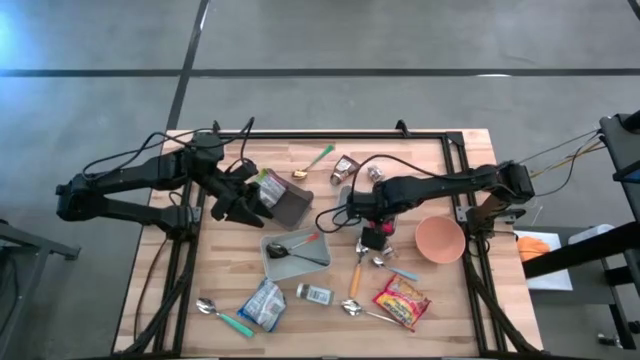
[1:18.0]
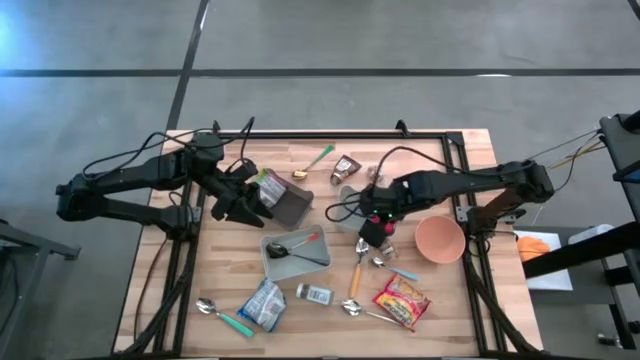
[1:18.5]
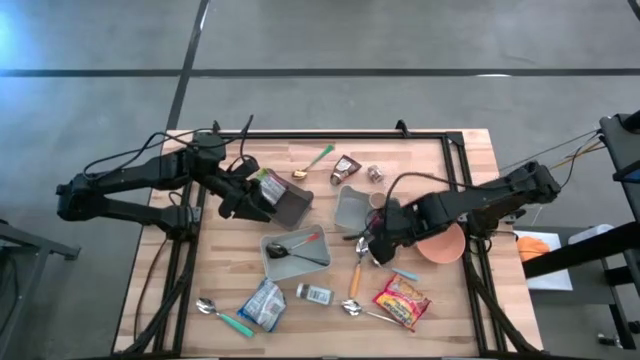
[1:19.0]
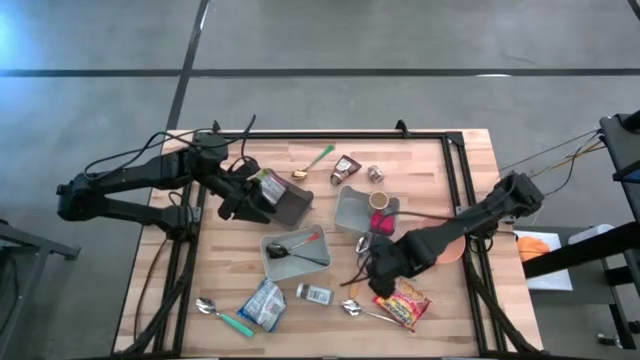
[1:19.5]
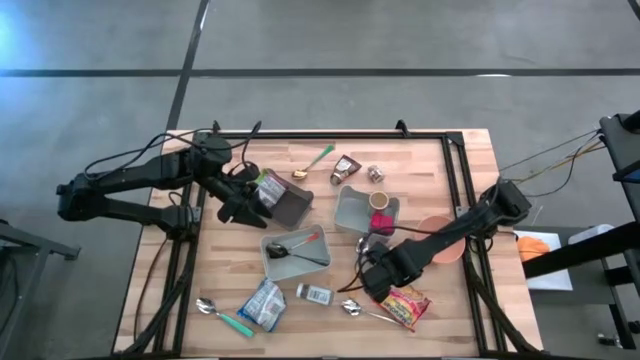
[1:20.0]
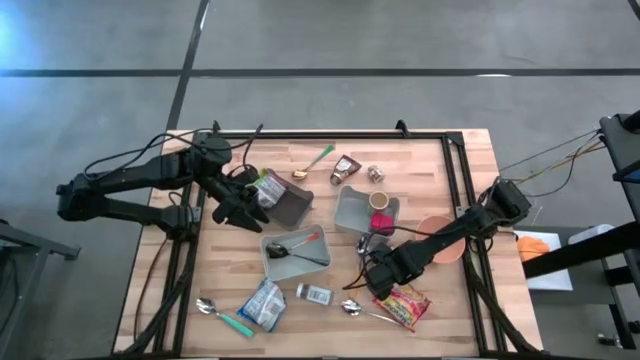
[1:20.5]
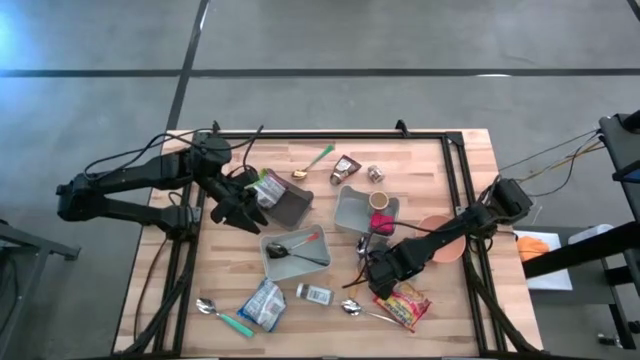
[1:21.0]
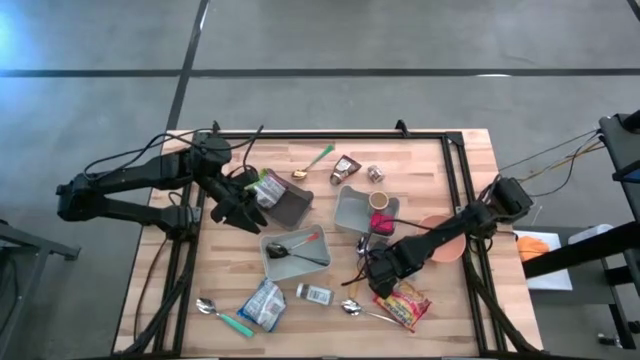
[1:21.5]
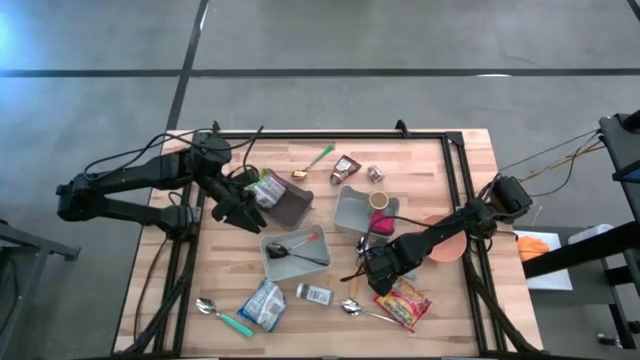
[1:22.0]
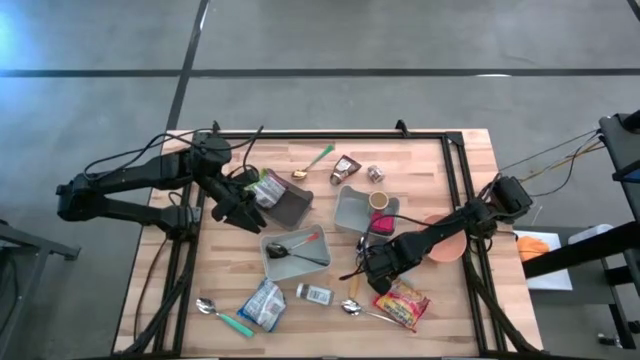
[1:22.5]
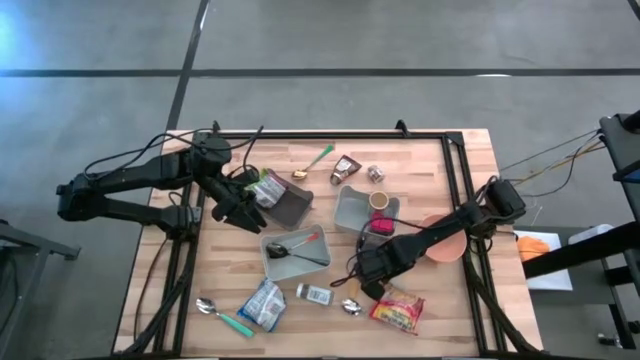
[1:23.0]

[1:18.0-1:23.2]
Put the blue spoon into the bottom gray bin

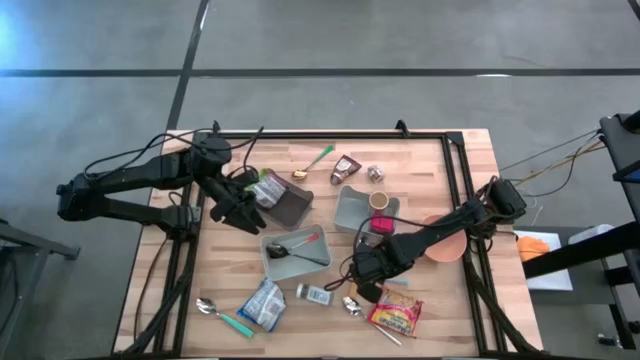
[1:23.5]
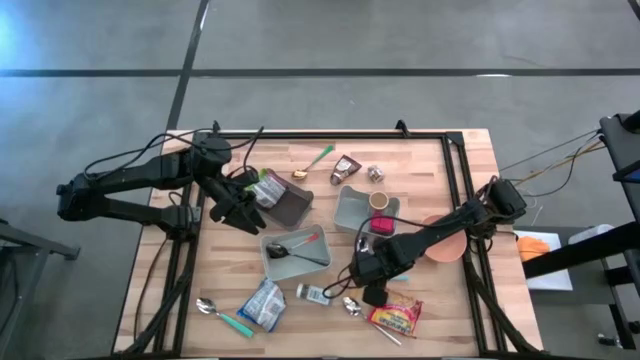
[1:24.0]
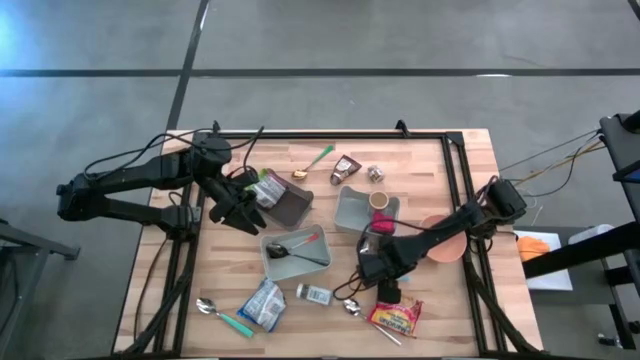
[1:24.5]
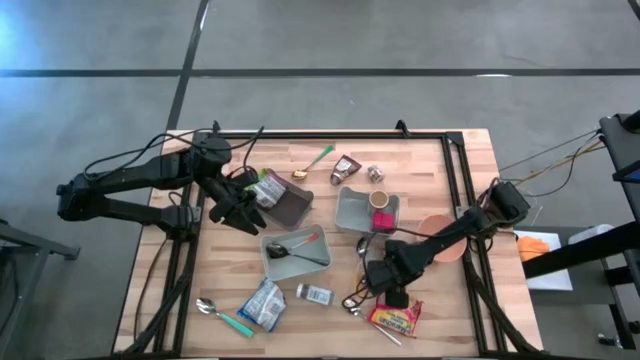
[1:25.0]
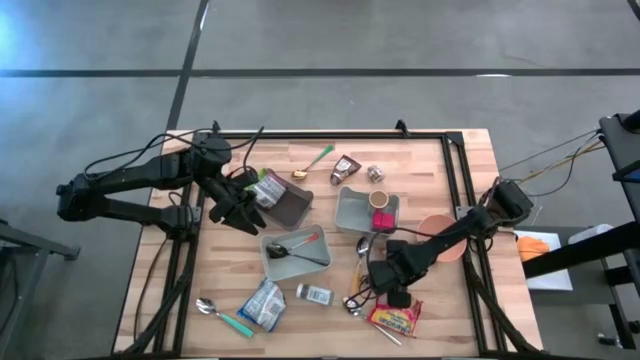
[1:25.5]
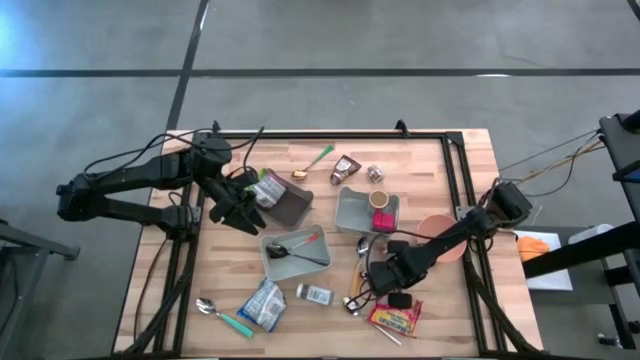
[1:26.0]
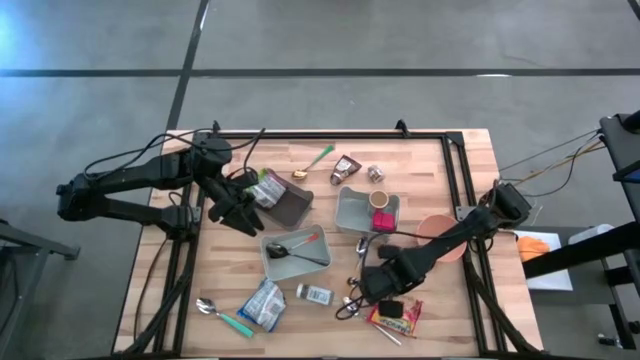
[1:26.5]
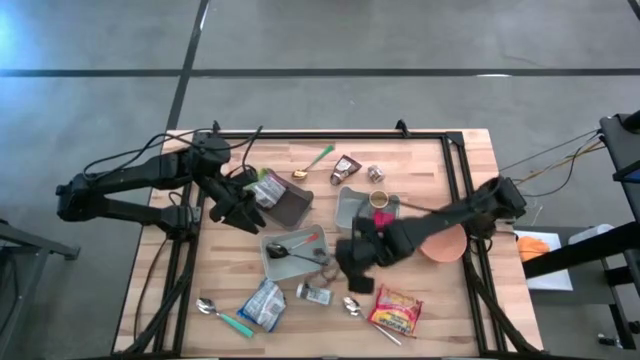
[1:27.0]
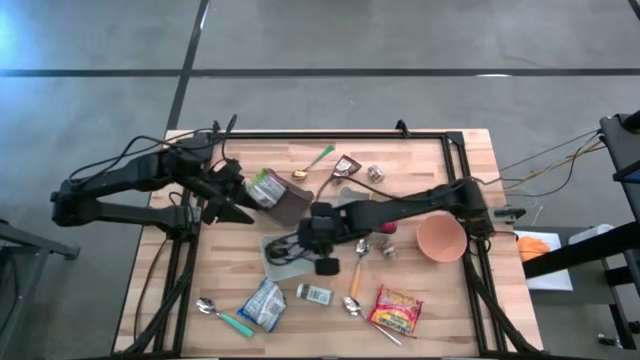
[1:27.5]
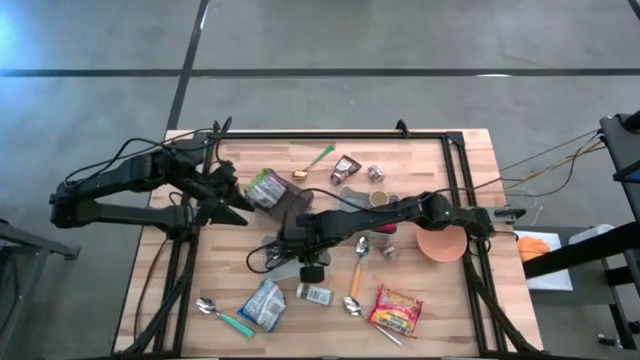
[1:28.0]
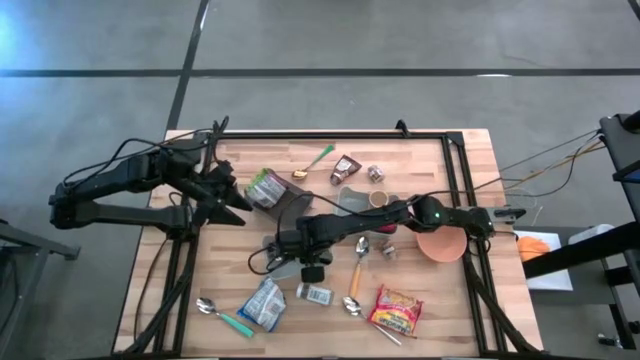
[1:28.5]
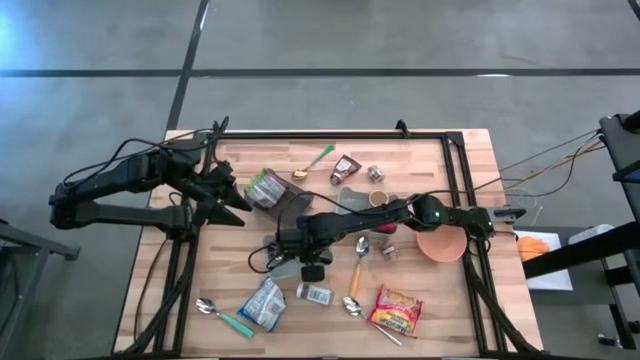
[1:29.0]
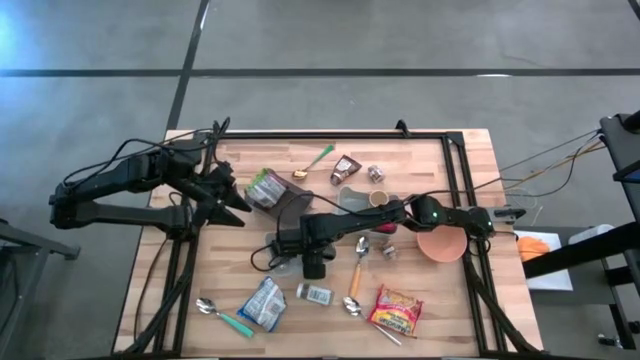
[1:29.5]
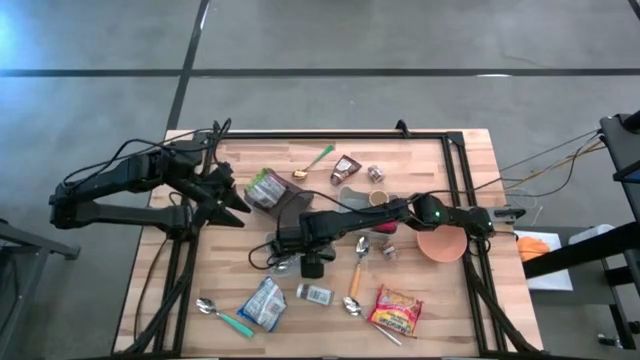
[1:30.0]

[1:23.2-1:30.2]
Put the blue spoon into the bottom gray bin

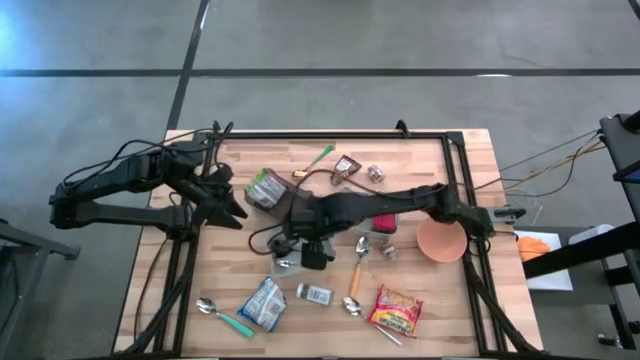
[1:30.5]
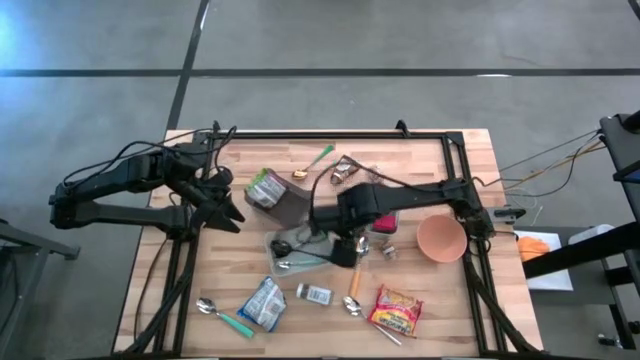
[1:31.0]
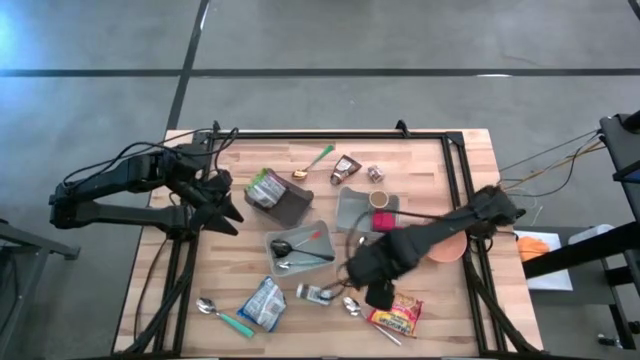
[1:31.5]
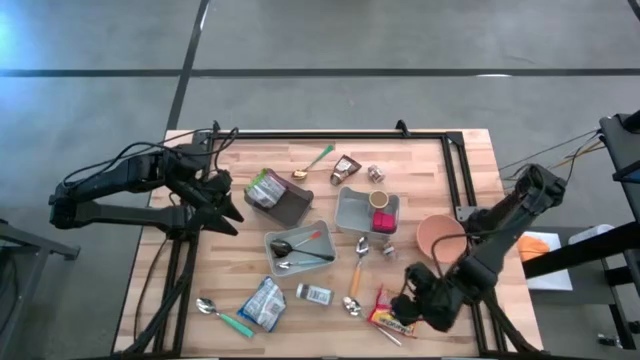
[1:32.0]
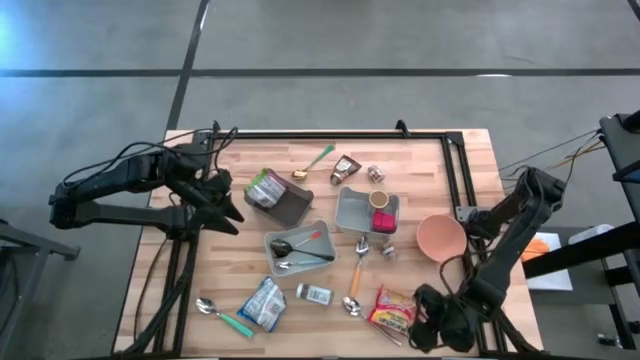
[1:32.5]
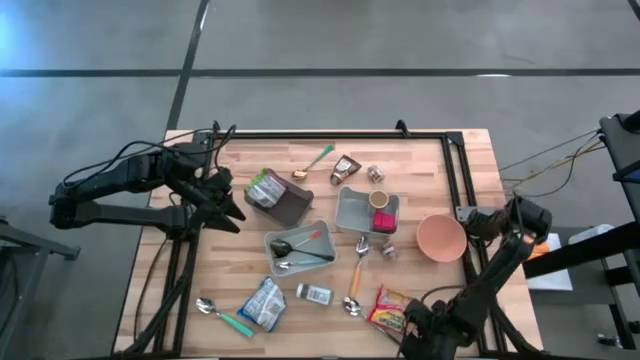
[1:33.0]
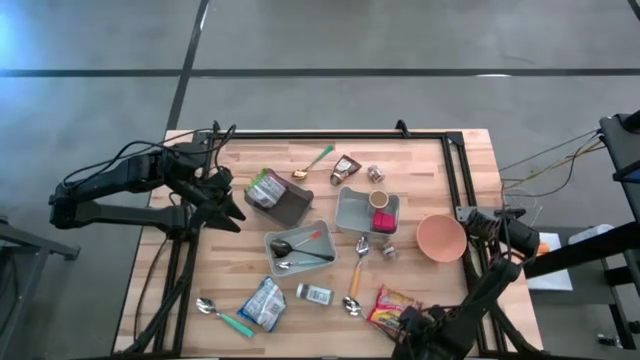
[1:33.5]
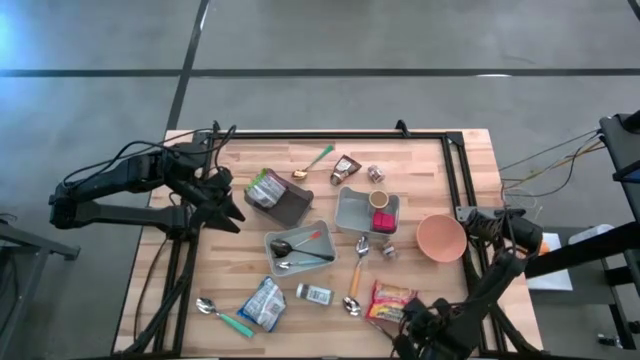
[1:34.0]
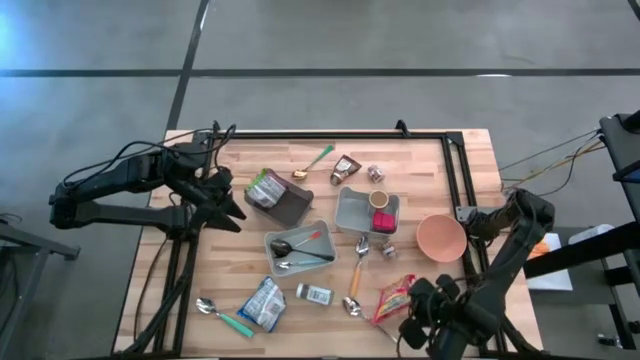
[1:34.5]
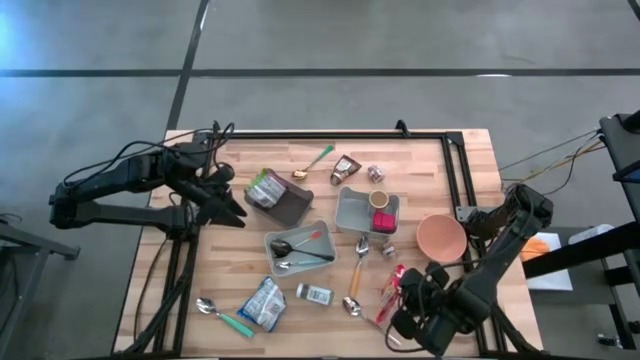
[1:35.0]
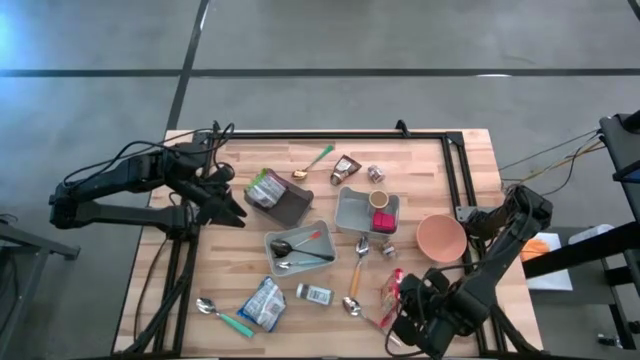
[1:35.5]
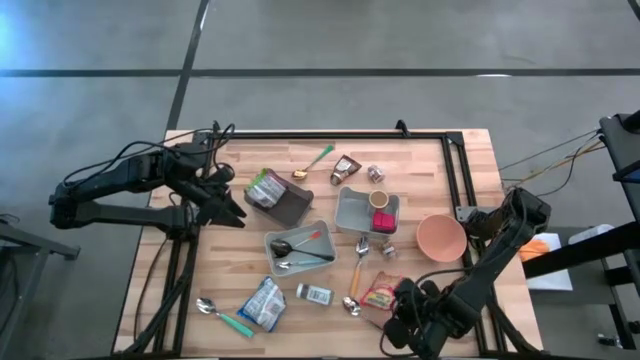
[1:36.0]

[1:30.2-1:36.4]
Put the red noodle pack into the black bin

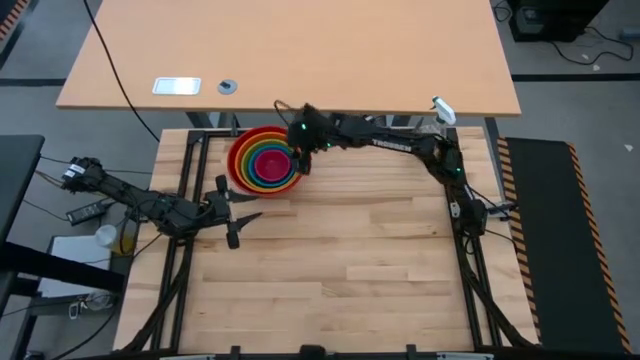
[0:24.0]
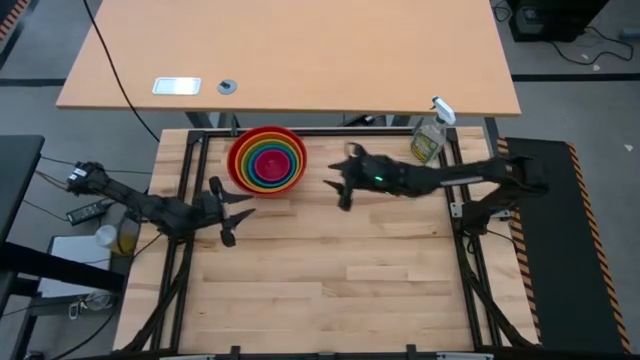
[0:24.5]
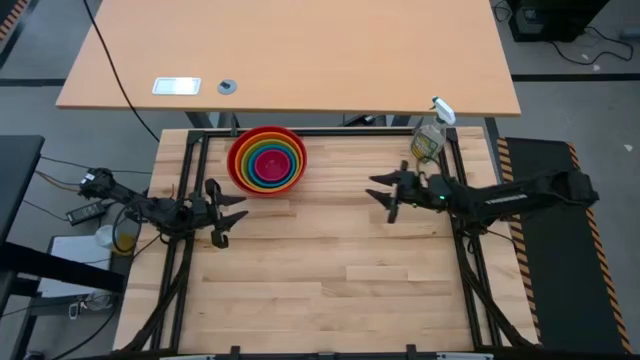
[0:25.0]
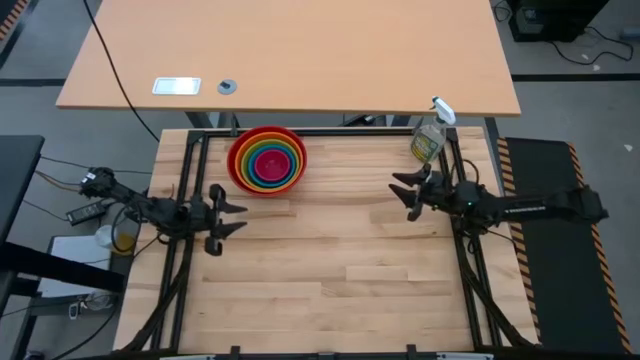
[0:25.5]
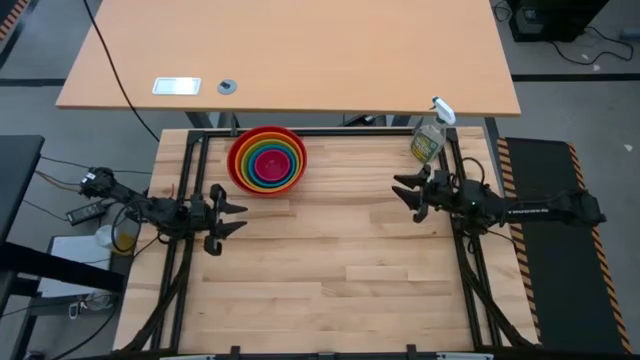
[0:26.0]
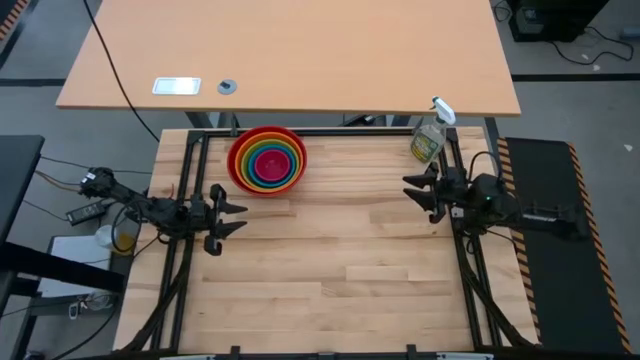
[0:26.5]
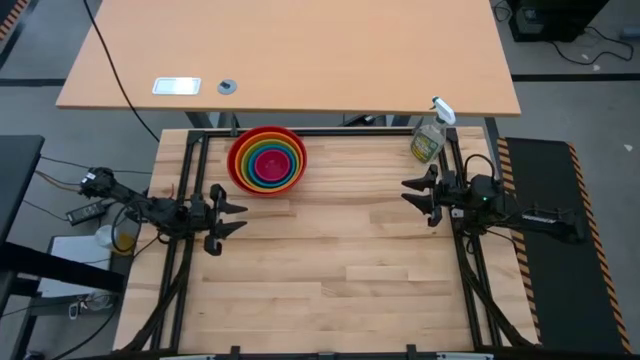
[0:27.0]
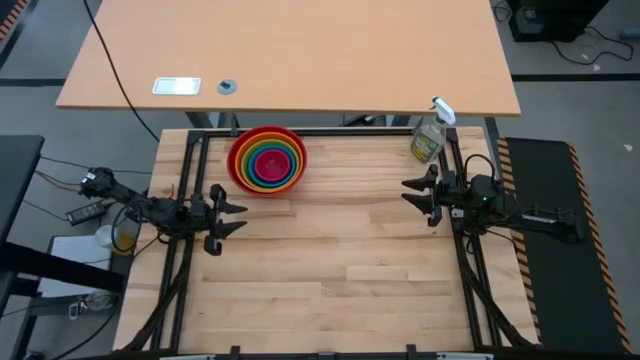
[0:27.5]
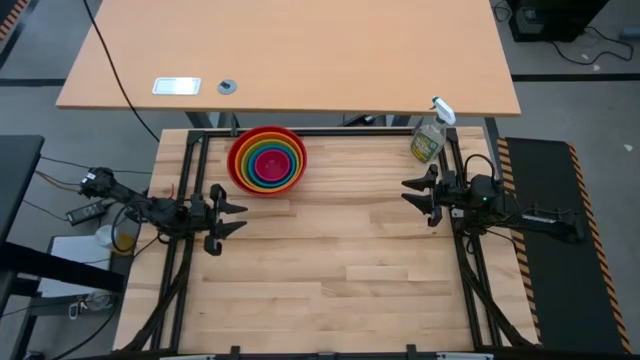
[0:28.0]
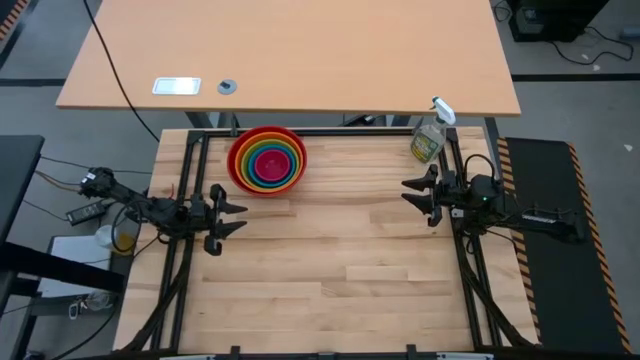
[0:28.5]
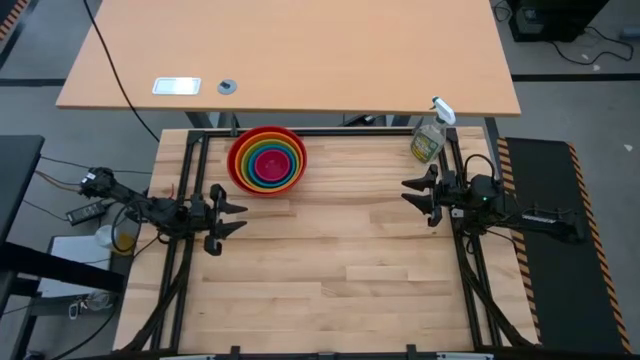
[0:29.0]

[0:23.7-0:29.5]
Return to Home Position
